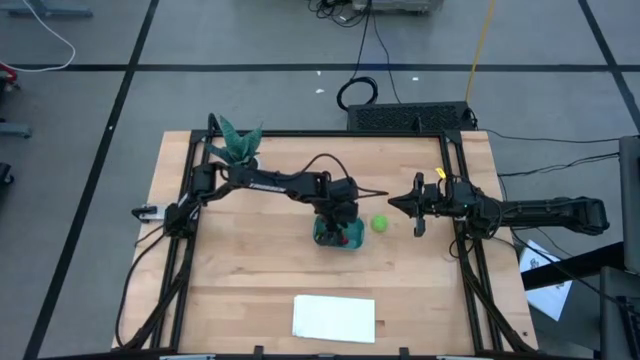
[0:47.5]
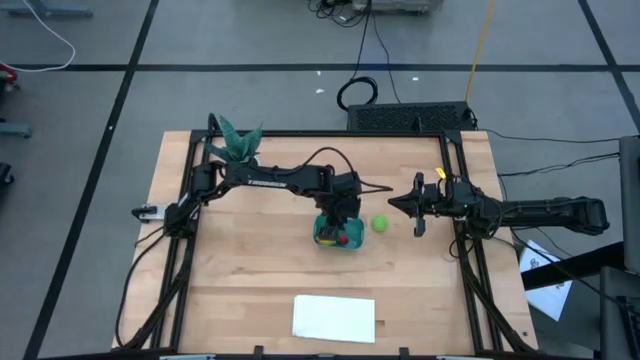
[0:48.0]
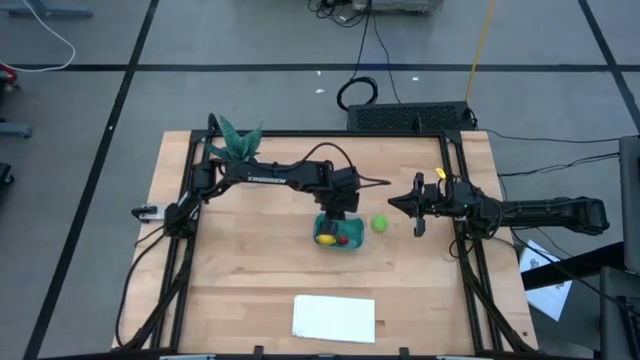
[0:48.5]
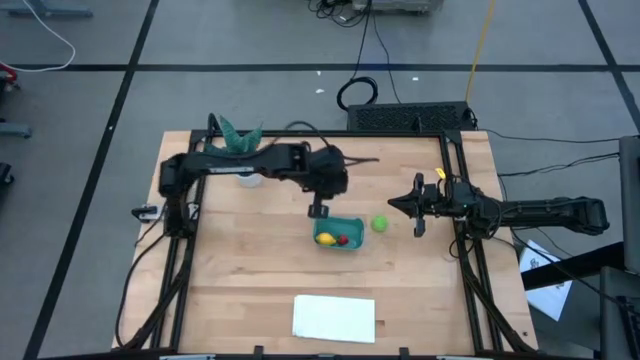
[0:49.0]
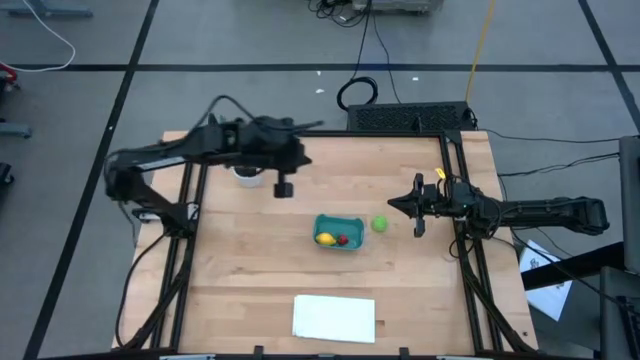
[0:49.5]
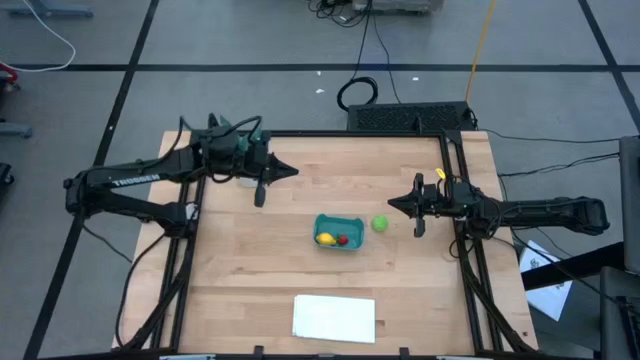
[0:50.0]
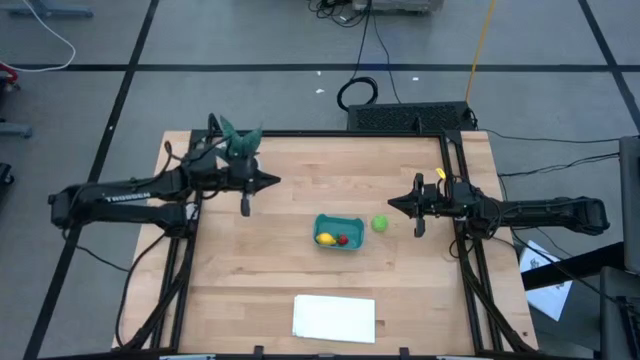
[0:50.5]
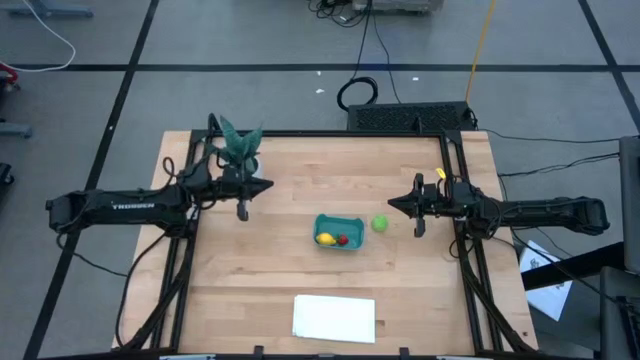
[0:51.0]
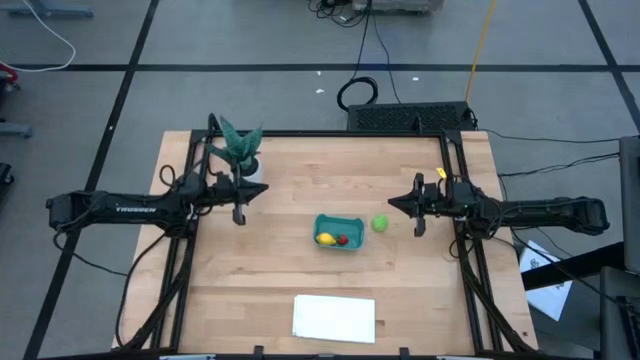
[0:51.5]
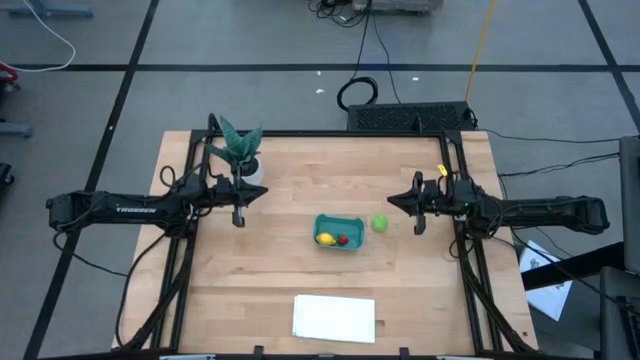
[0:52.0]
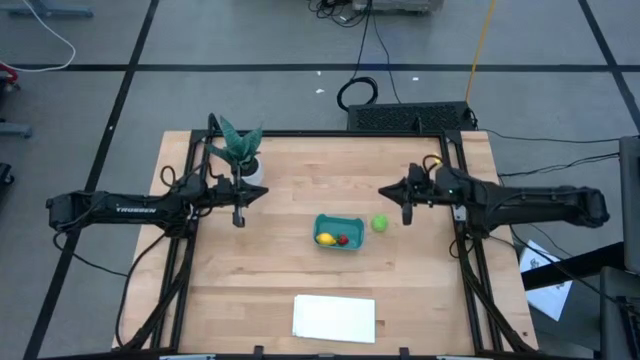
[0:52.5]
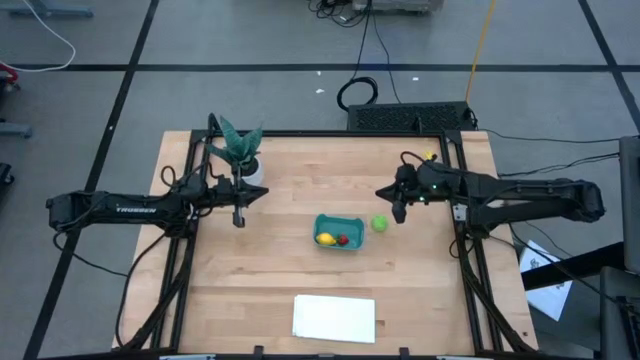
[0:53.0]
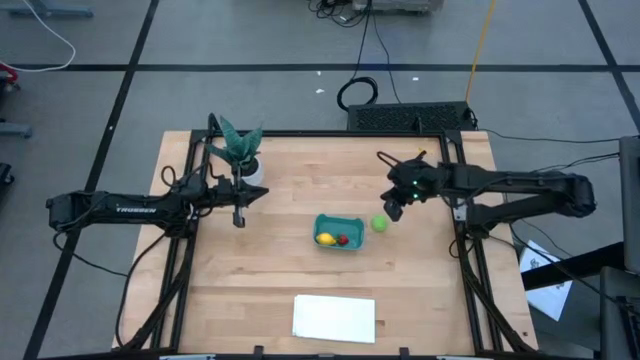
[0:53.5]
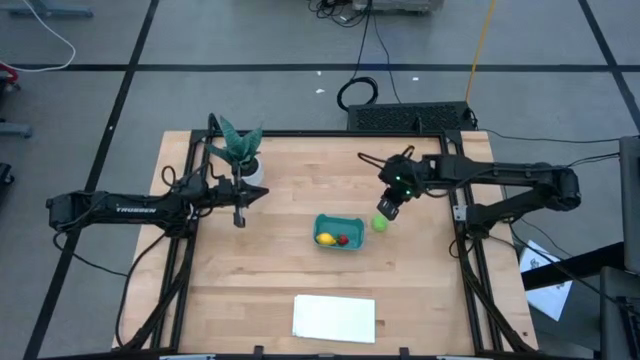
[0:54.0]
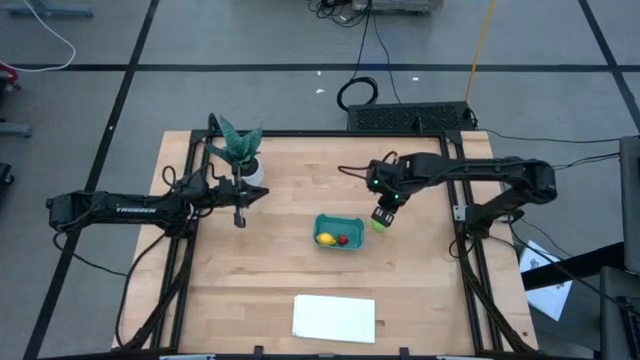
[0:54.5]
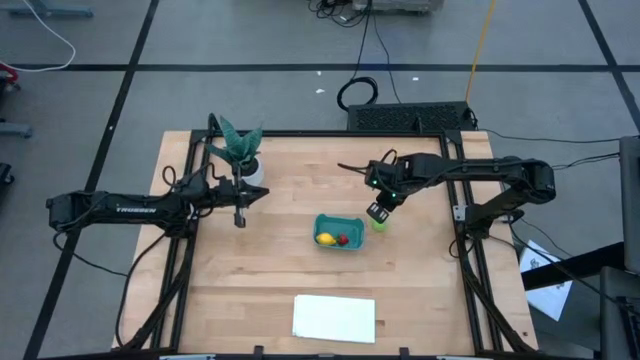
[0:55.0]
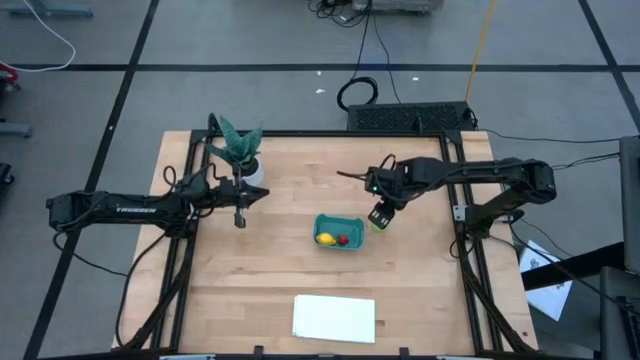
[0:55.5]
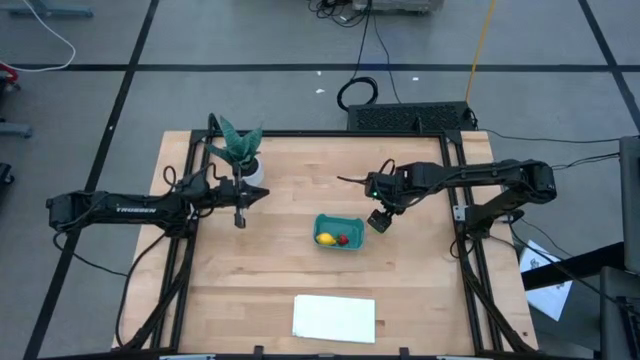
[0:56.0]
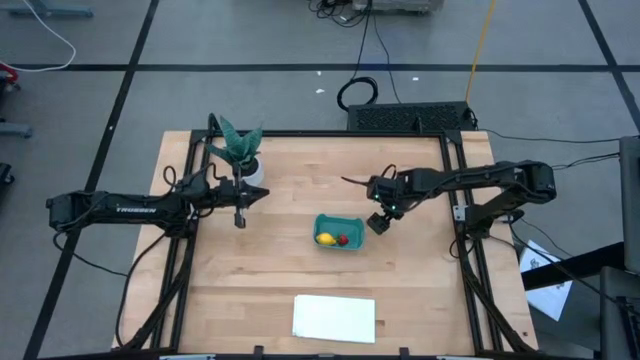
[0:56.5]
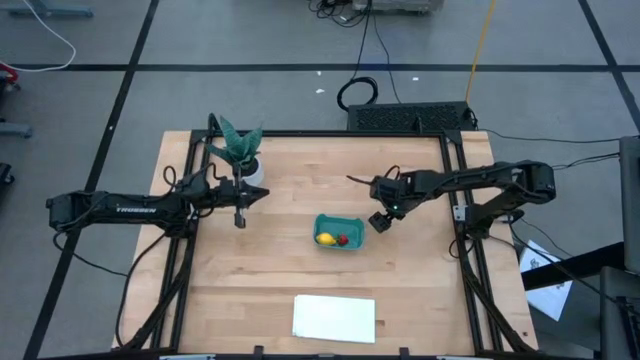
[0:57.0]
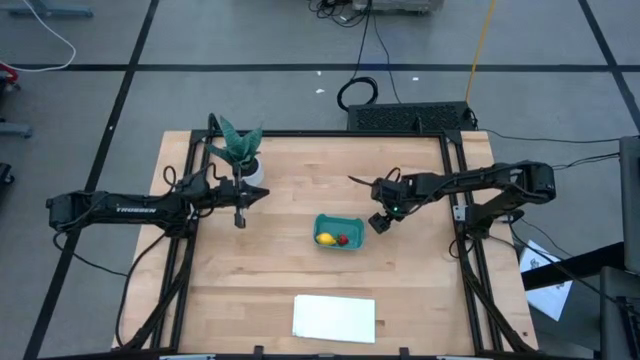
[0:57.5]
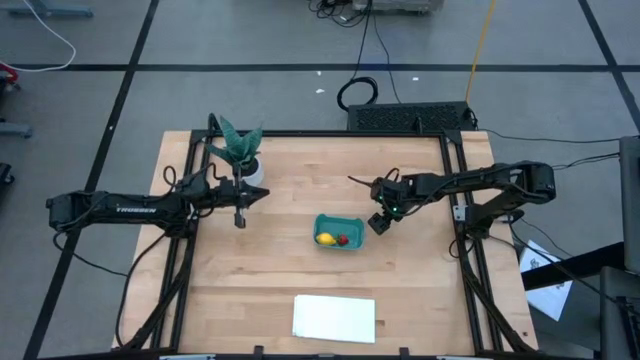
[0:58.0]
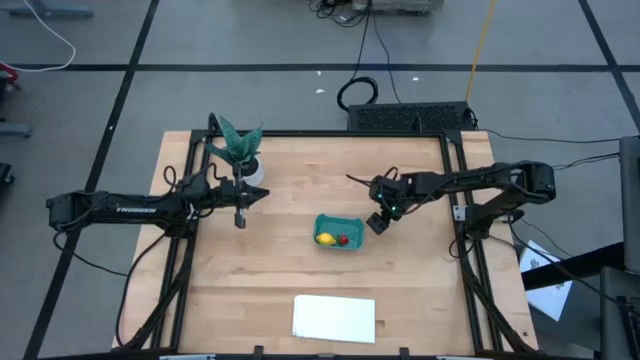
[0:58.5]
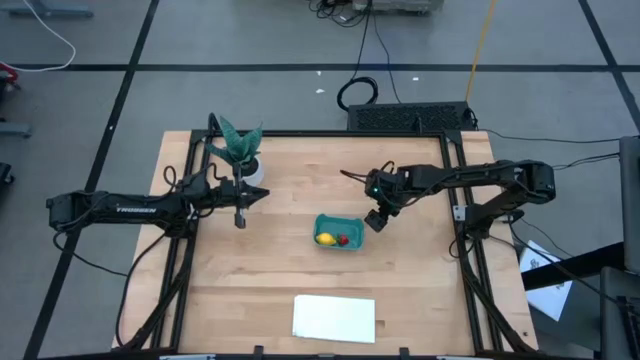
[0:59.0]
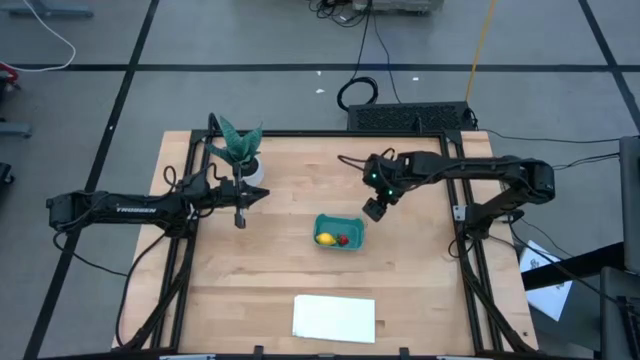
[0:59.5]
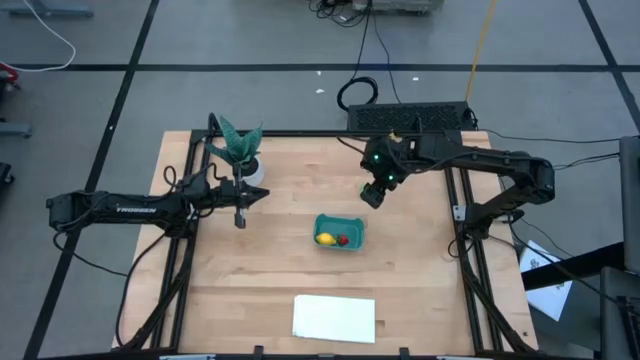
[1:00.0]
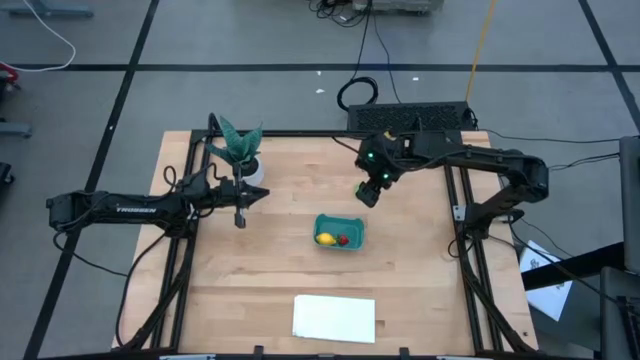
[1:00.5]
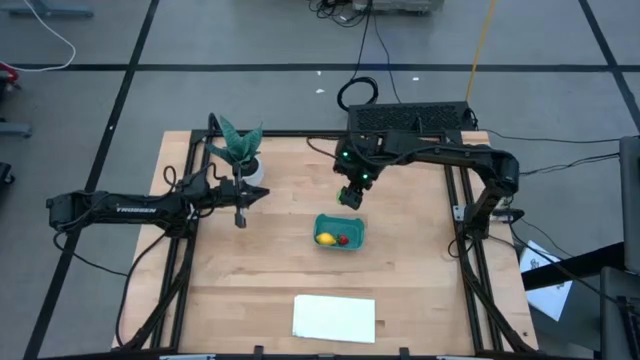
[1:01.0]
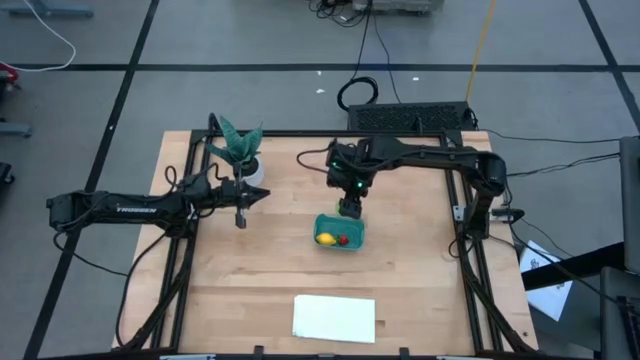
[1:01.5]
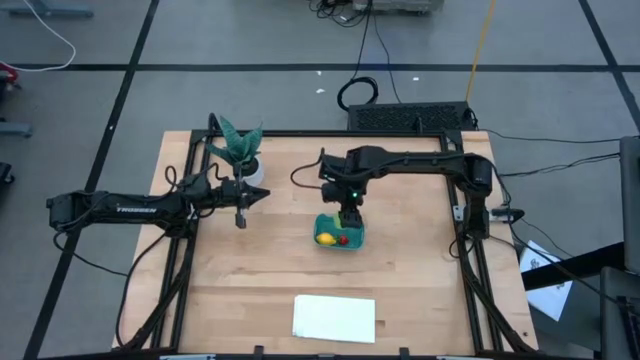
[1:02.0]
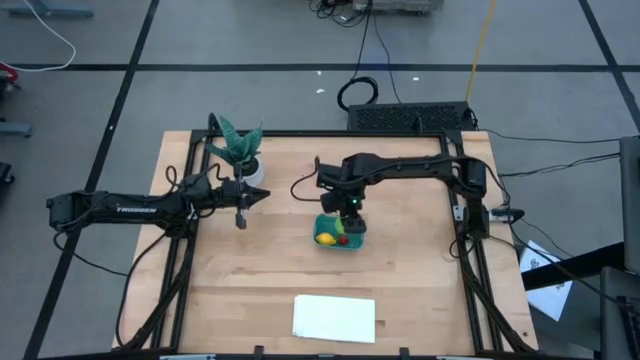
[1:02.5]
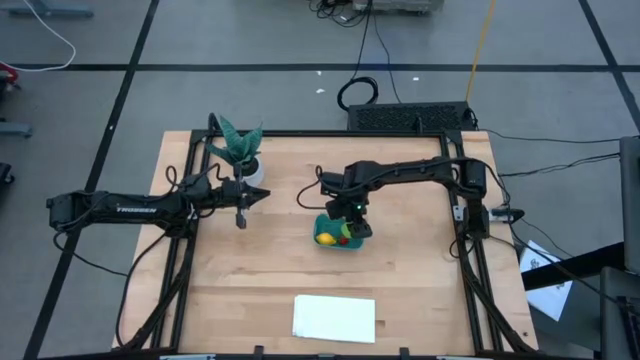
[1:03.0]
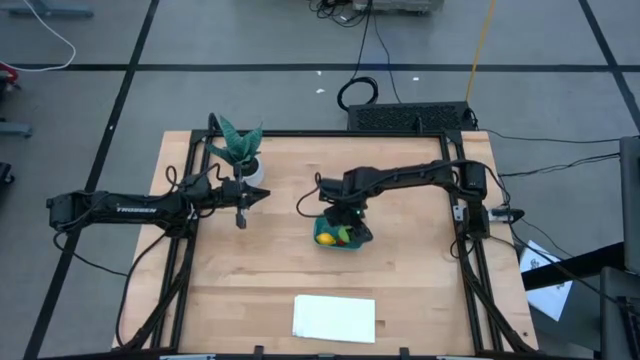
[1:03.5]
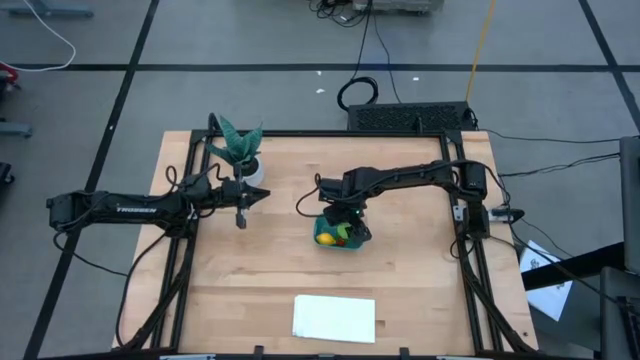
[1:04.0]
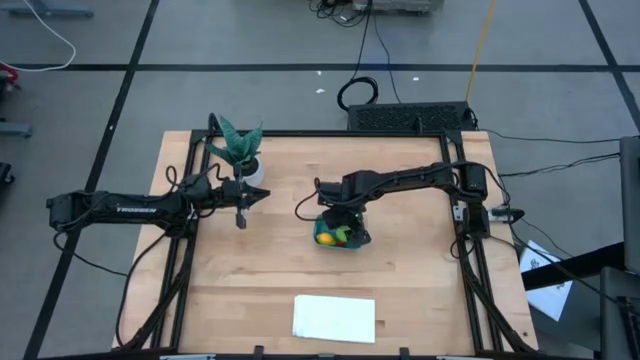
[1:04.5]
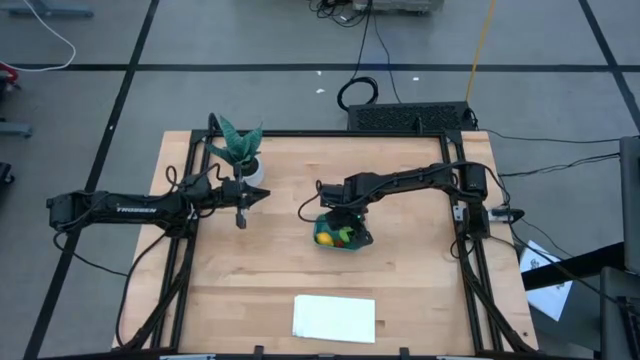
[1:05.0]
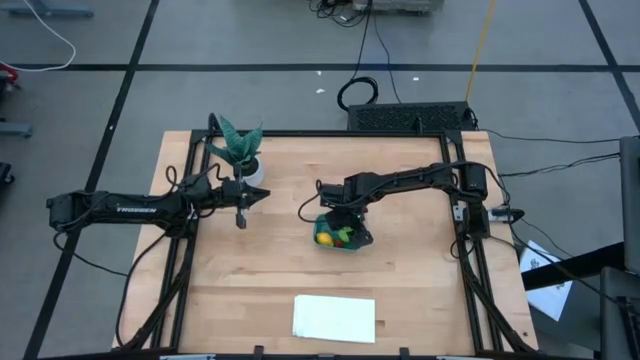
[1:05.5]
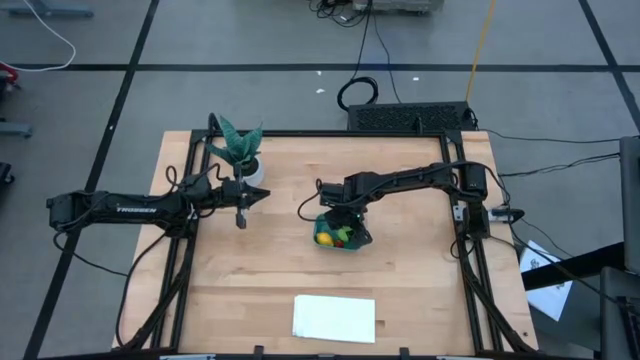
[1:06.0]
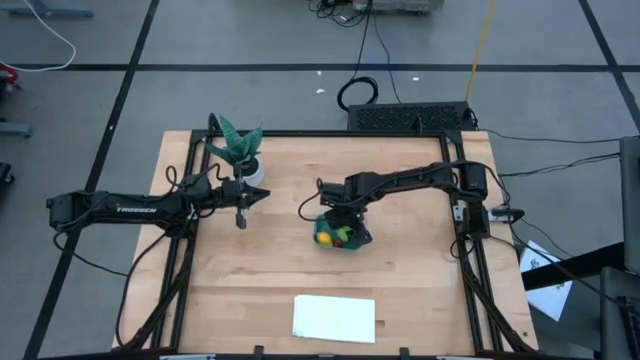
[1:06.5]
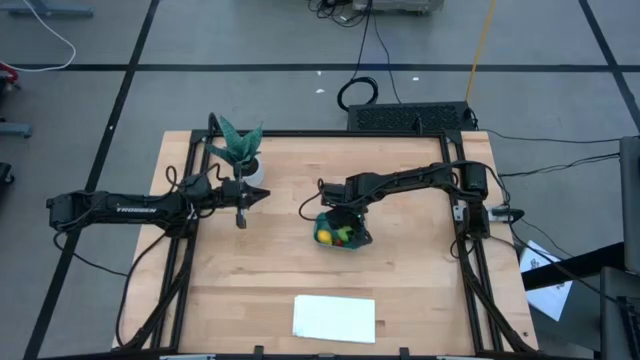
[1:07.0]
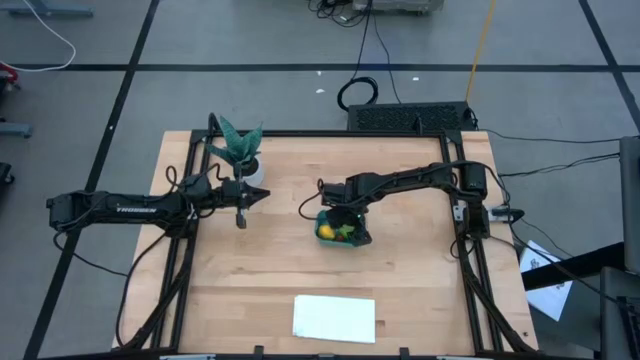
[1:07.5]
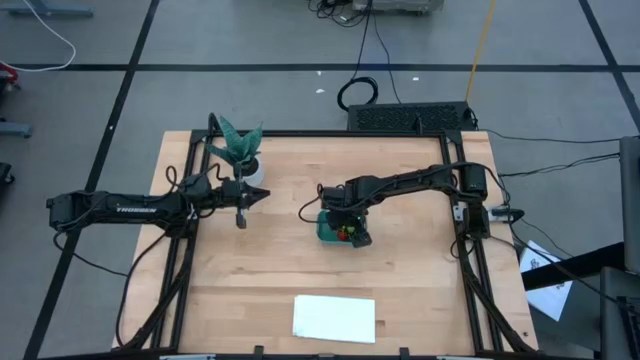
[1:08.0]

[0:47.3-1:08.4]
Task: Pick and placing Produce into tupperware
Put the green cabbage into the blue bin
